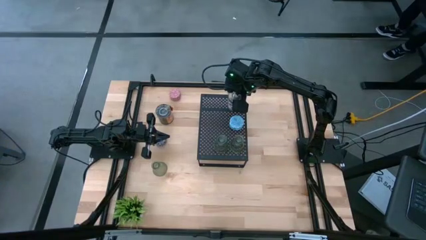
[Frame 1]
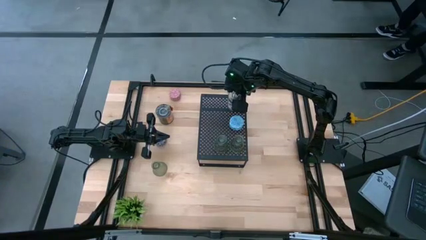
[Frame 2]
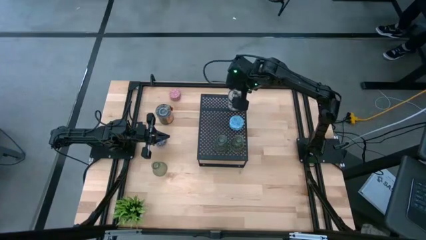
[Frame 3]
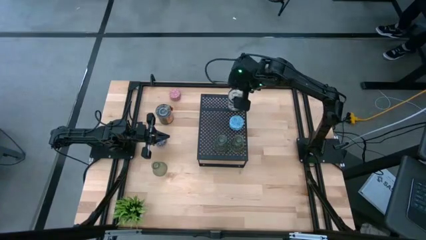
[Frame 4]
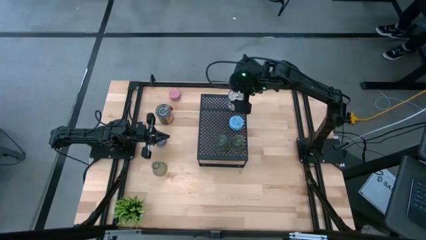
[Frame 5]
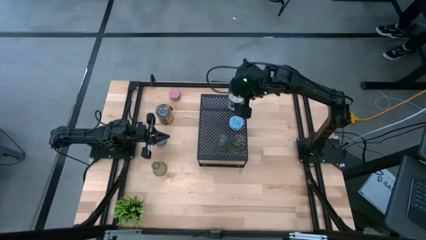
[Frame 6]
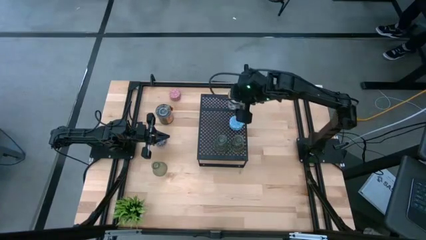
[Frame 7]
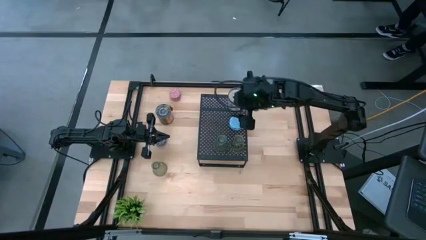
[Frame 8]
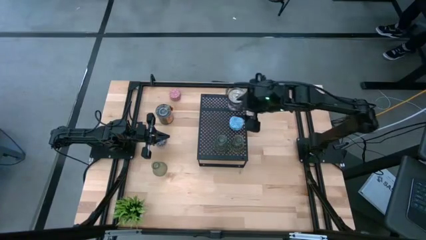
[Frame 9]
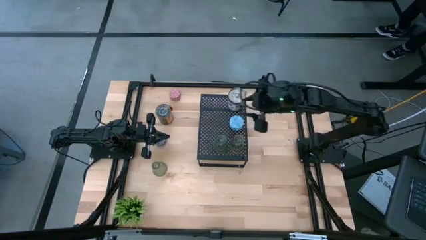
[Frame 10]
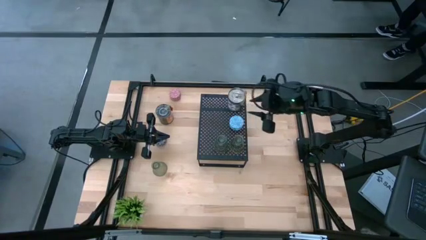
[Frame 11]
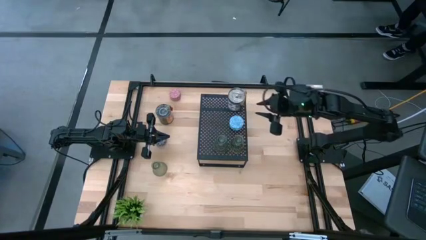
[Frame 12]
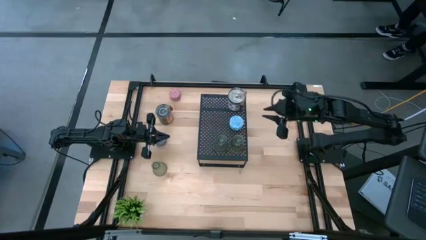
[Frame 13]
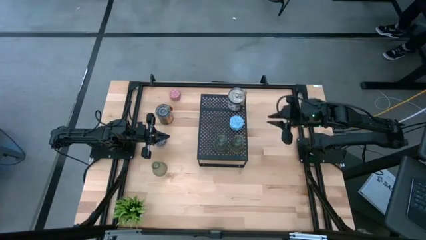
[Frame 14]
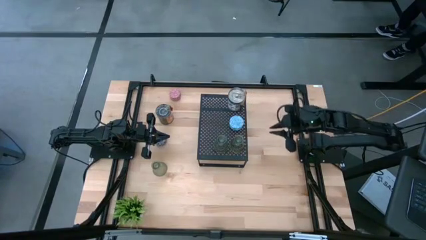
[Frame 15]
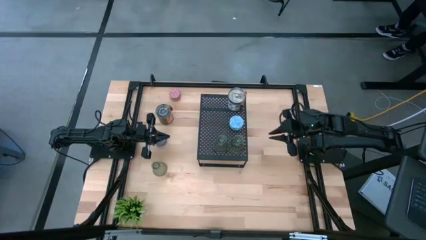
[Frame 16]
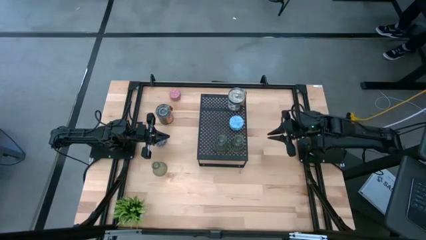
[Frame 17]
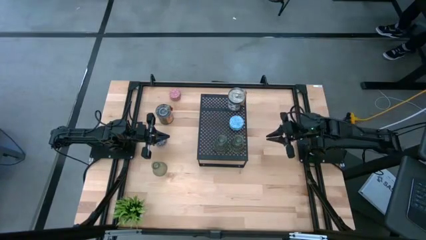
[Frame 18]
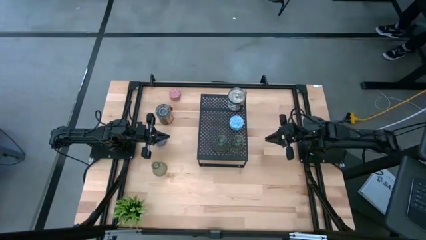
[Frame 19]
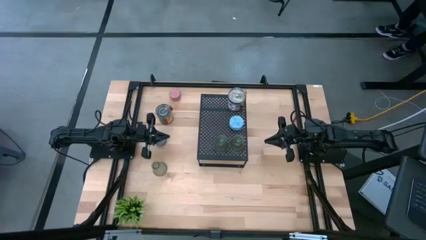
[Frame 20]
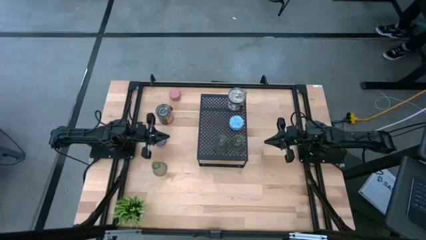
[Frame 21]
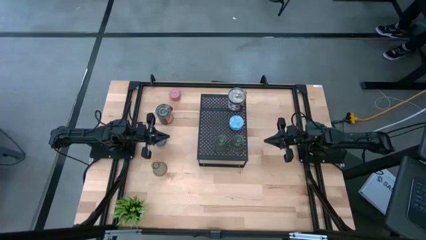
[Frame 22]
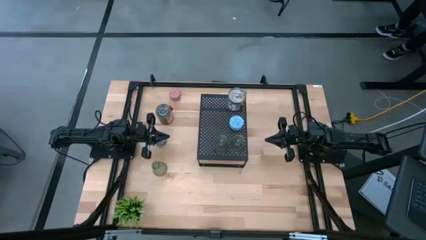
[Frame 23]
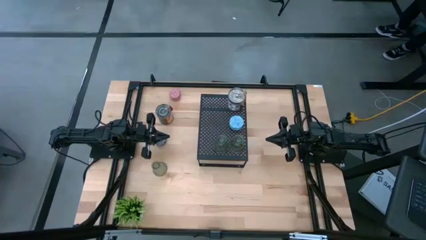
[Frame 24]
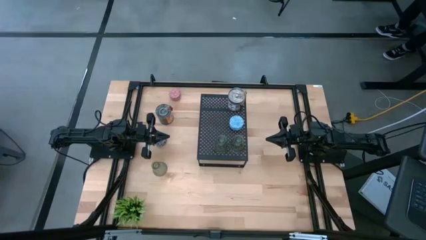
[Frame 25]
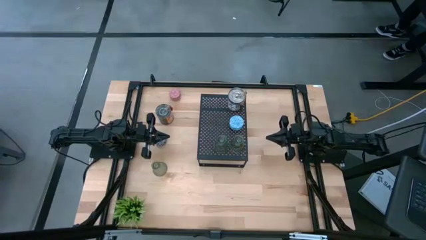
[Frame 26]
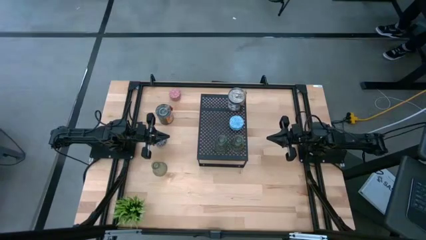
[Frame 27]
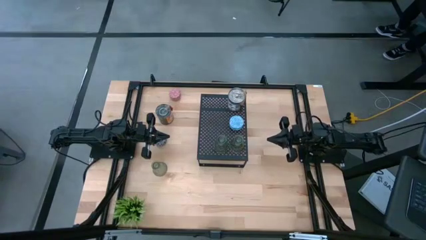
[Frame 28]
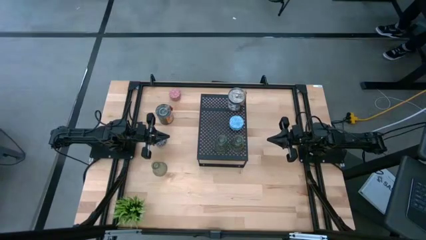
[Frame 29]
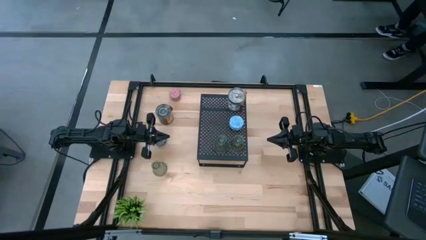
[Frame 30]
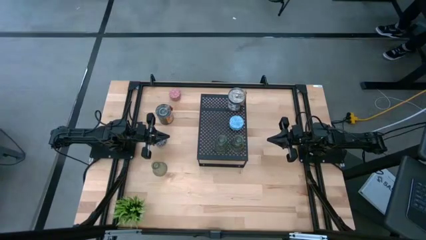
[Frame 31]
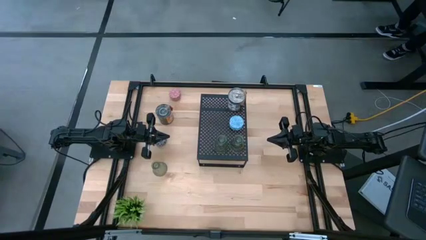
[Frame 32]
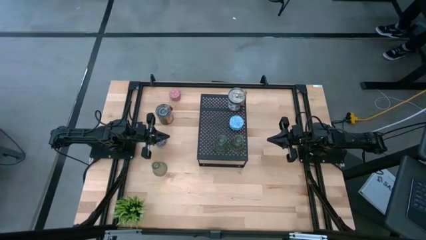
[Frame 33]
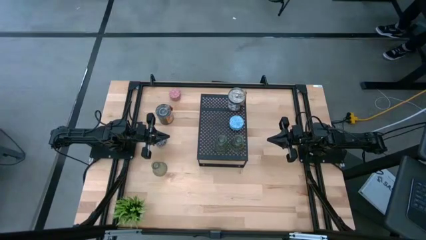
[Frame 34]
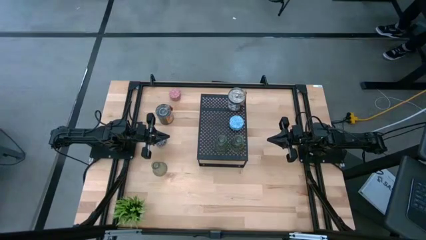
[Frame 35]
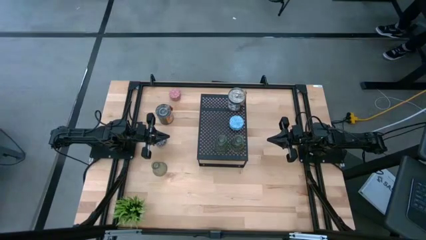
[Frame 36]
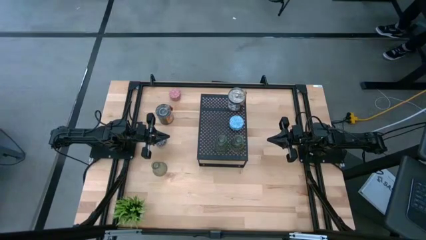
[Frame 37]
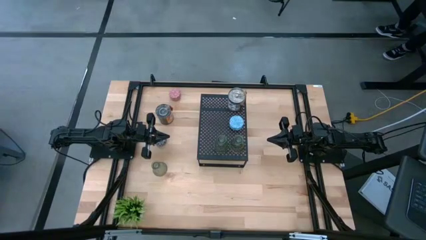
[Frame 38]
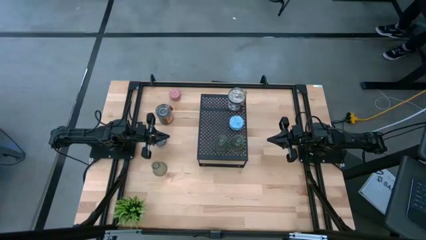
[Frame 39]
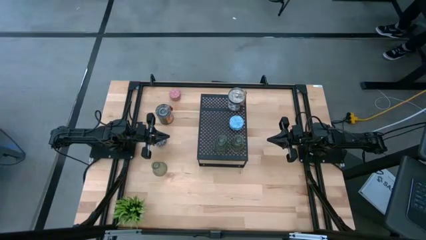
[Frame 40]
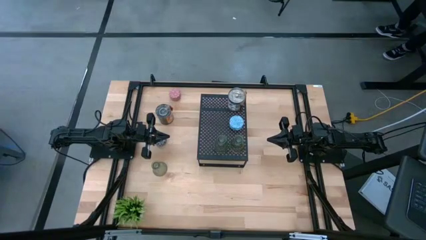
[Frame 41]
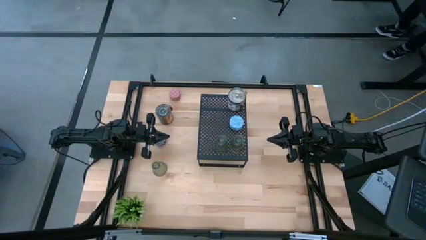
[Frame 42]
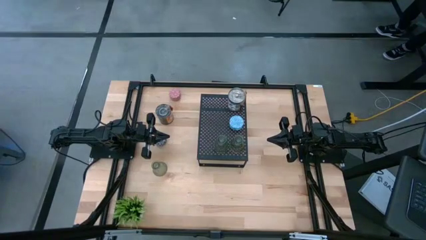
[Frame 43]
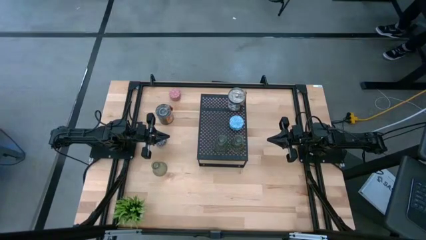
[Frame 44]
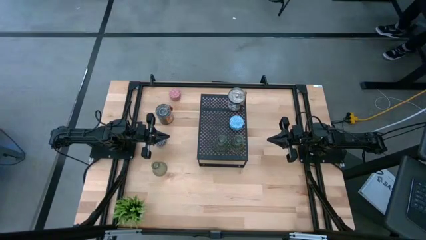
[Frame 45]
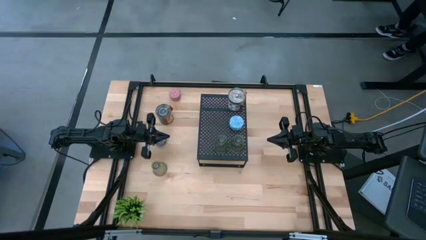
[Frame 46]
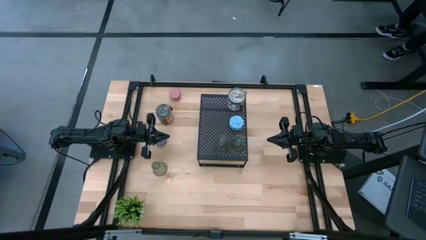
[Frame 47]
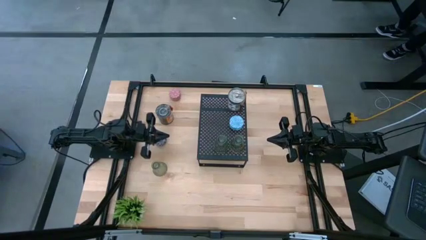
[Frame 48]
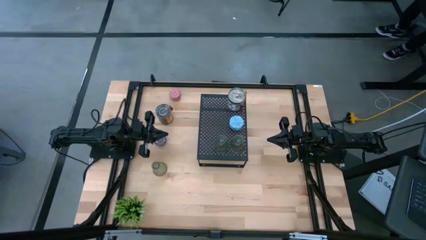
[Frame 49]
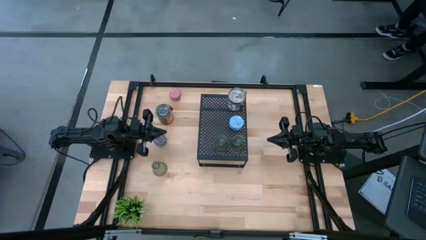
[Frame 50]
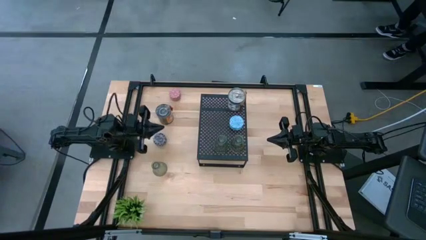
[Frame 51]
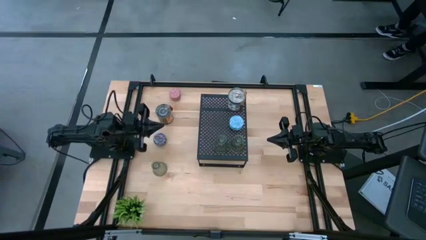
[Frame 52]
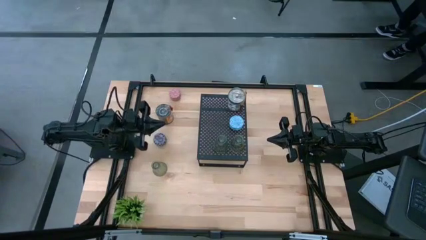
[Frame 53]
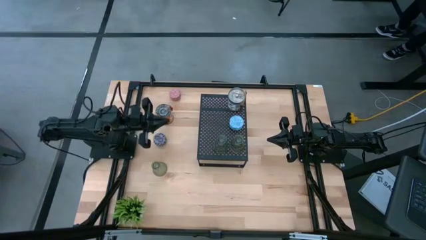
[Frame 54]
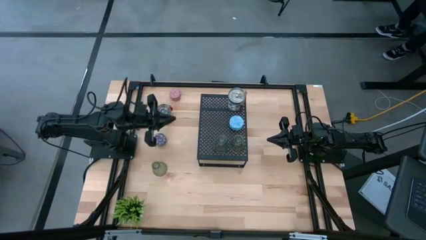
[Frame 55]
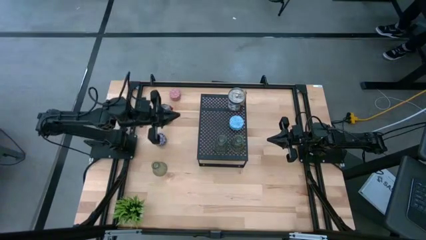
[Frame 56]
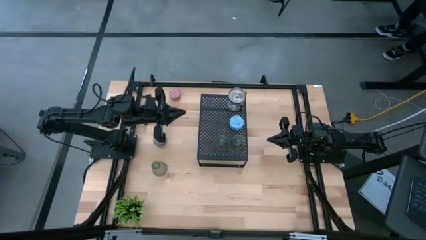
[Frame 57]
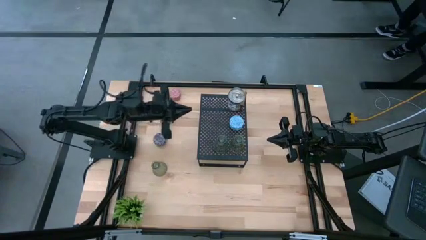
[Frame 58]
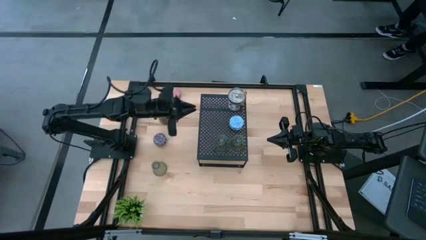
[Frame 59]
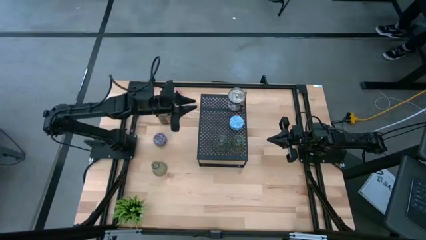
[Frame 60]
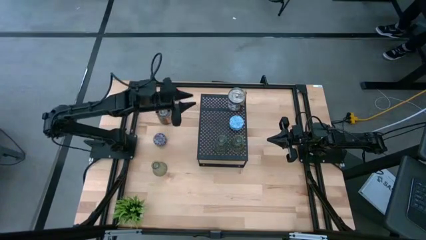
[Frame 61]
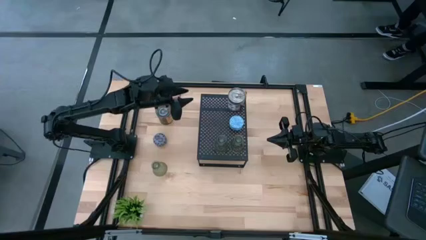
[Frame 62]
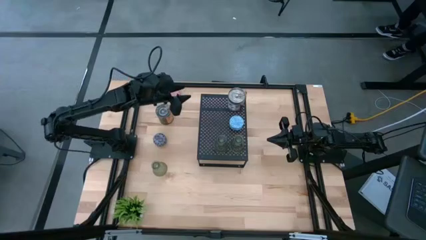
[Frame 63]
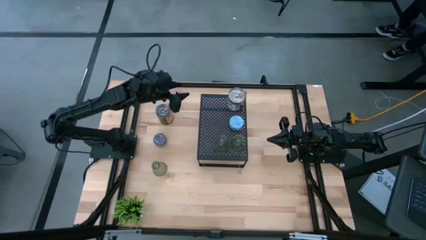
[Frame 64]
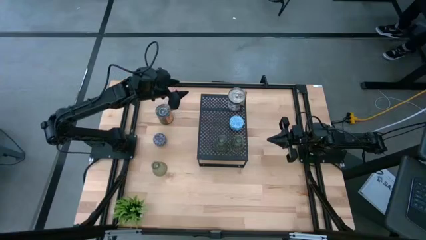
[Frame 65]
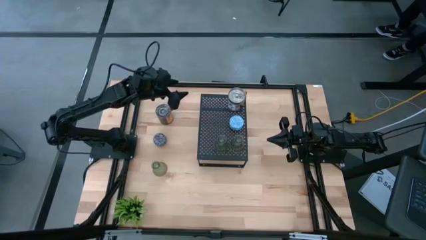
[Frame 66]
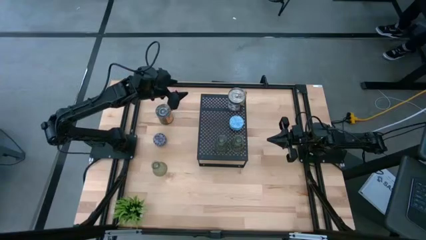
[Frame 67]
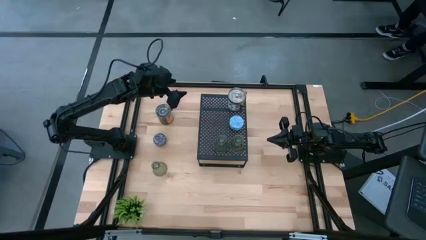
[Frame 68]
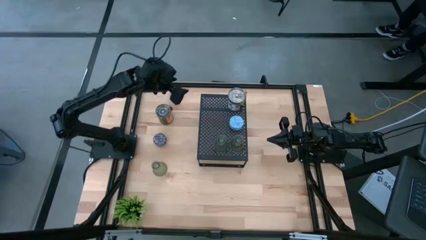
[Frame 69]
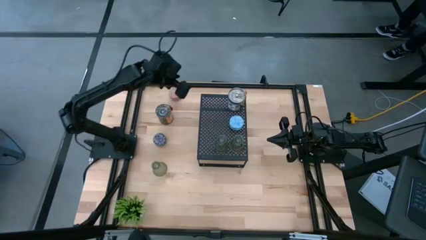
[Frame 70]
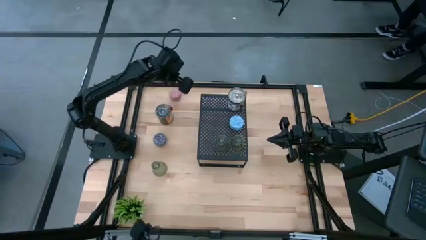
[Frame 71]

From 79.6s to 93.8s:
Task: Pick & Place candle stick holders
Put the patterned pink scented candle on the shelf aligned with the other patterned blue scented candle
